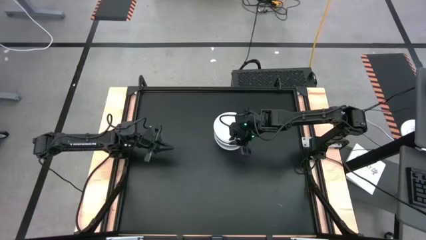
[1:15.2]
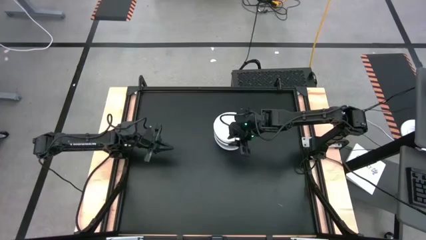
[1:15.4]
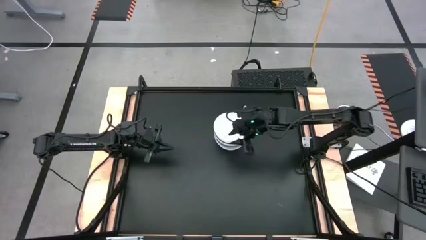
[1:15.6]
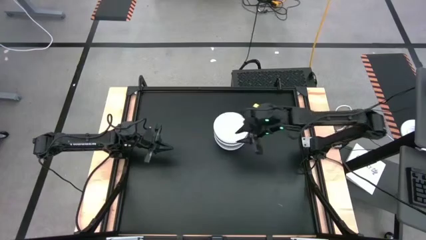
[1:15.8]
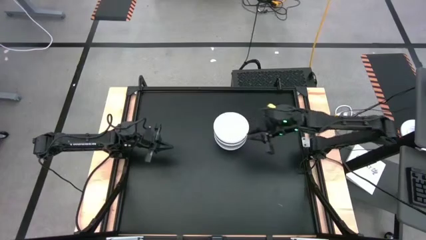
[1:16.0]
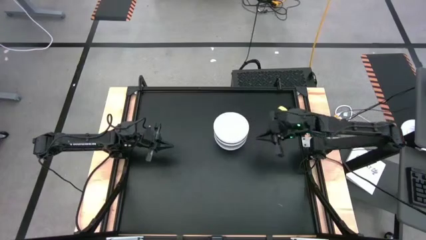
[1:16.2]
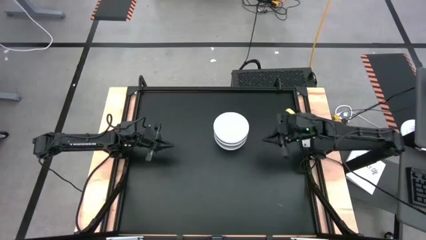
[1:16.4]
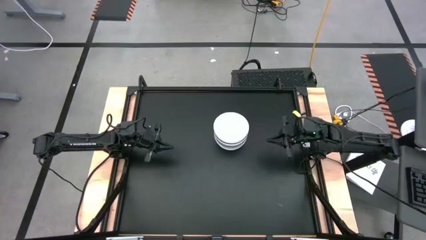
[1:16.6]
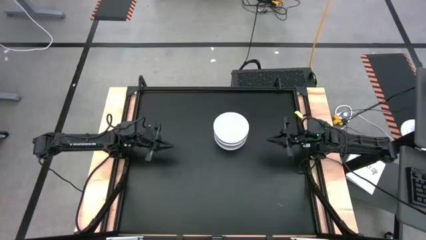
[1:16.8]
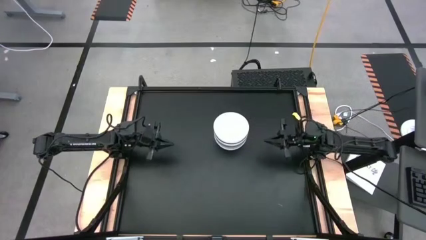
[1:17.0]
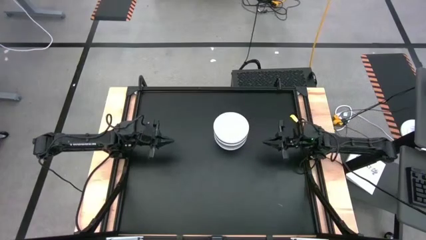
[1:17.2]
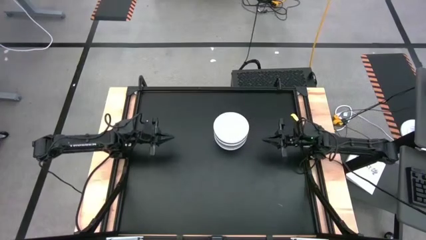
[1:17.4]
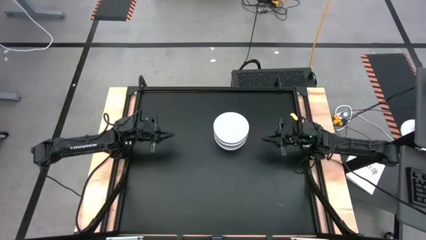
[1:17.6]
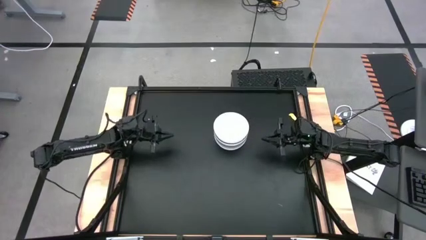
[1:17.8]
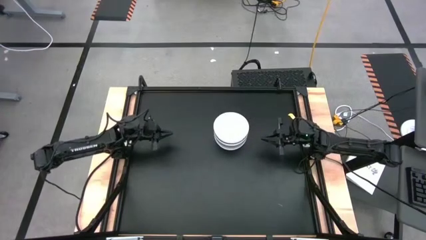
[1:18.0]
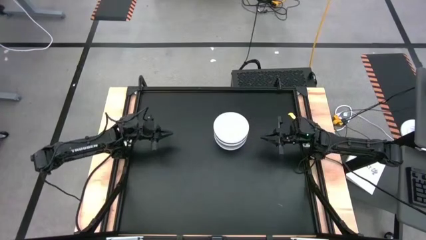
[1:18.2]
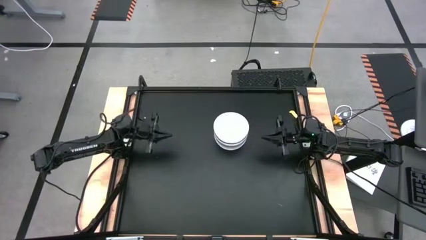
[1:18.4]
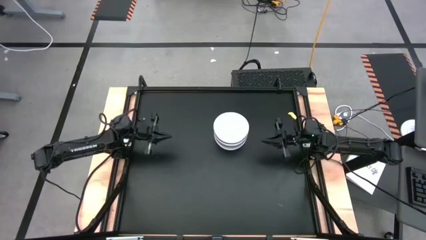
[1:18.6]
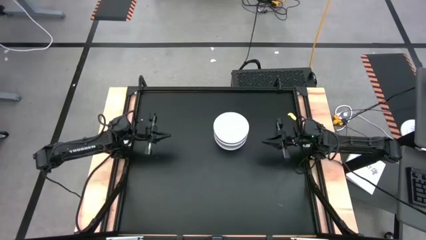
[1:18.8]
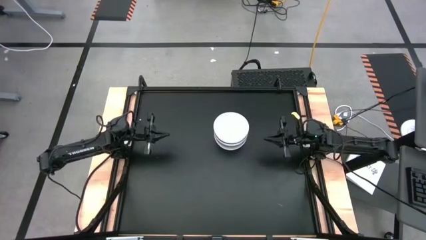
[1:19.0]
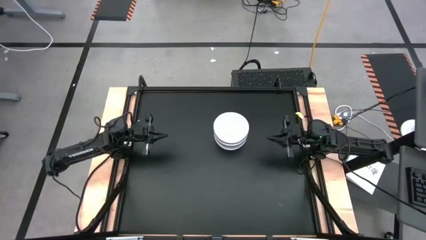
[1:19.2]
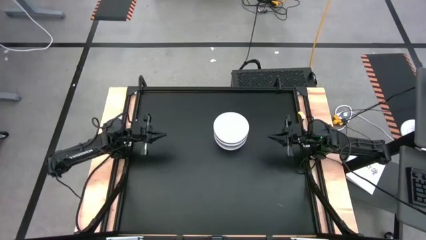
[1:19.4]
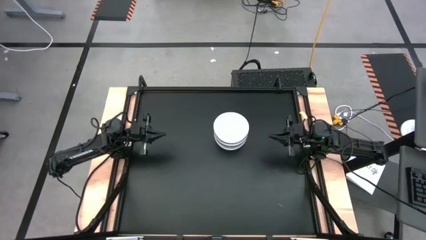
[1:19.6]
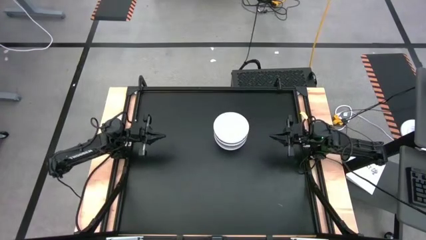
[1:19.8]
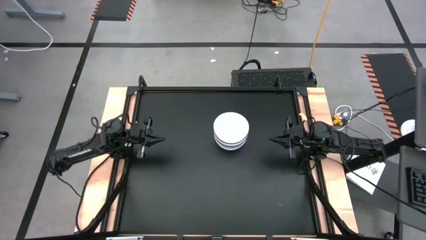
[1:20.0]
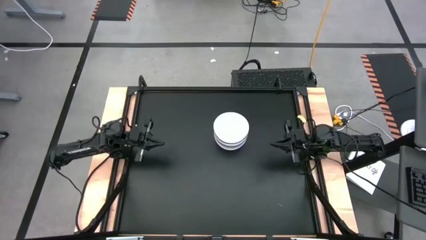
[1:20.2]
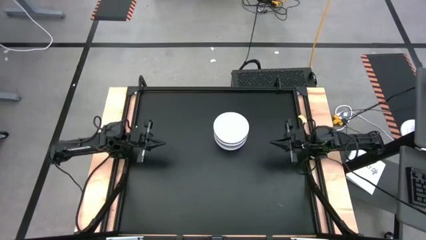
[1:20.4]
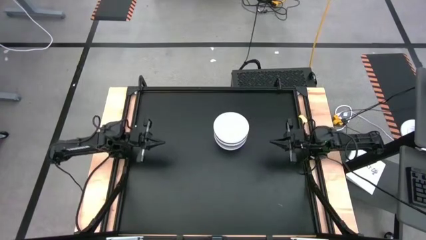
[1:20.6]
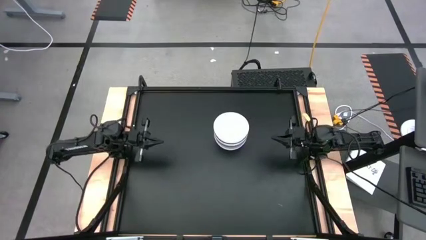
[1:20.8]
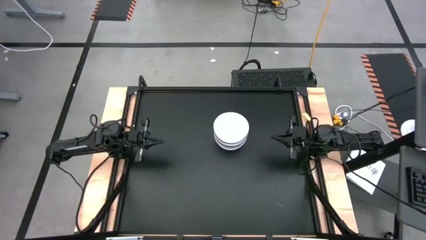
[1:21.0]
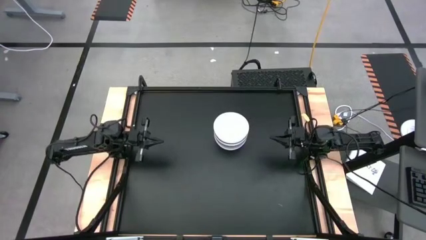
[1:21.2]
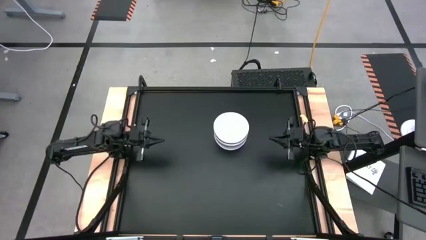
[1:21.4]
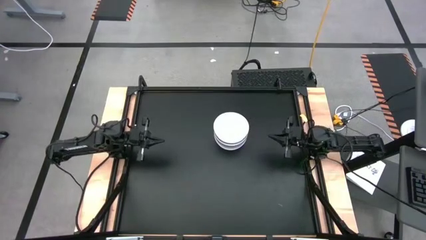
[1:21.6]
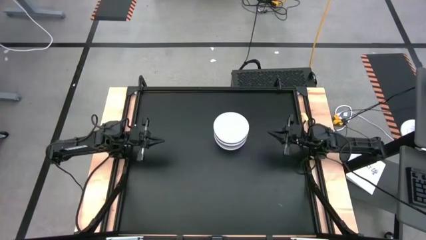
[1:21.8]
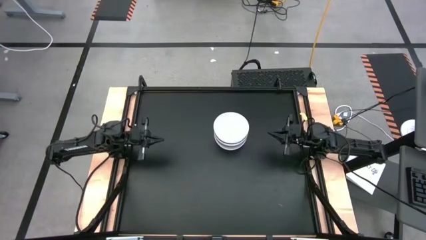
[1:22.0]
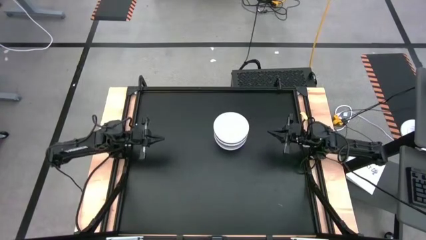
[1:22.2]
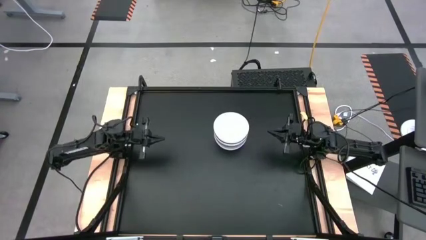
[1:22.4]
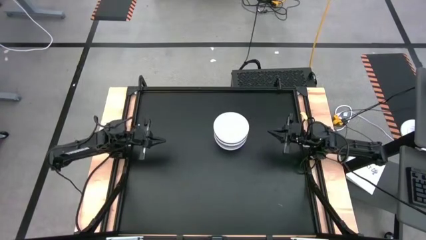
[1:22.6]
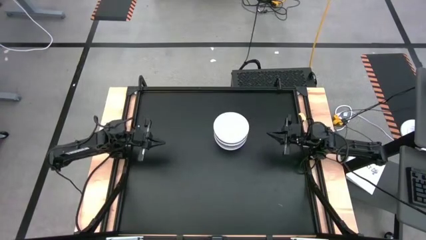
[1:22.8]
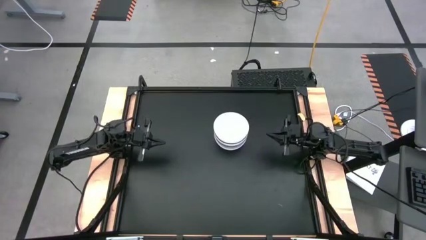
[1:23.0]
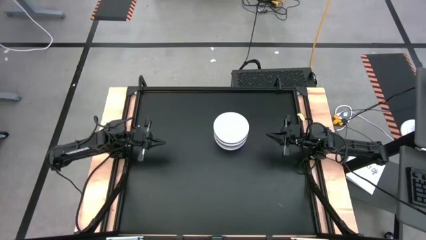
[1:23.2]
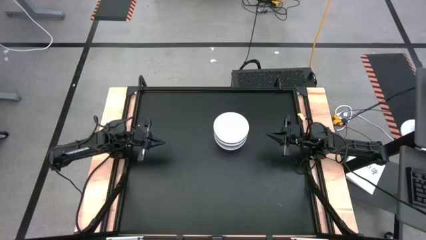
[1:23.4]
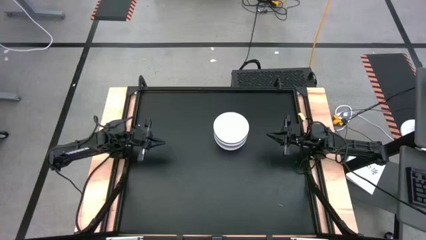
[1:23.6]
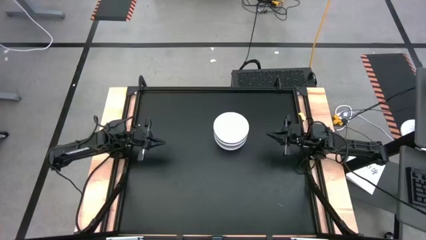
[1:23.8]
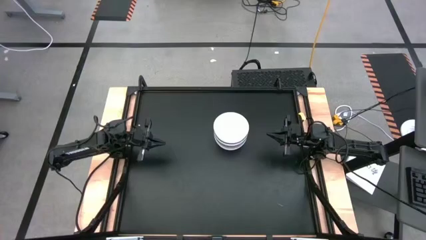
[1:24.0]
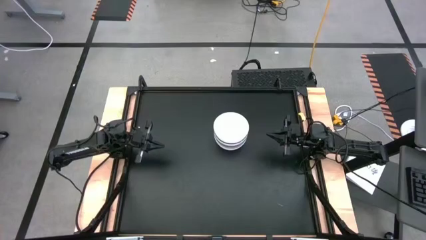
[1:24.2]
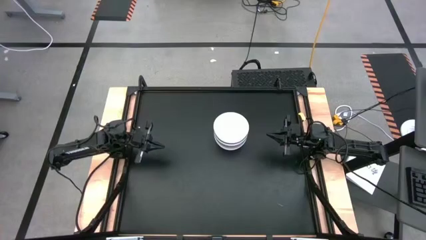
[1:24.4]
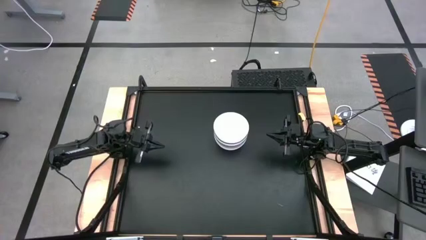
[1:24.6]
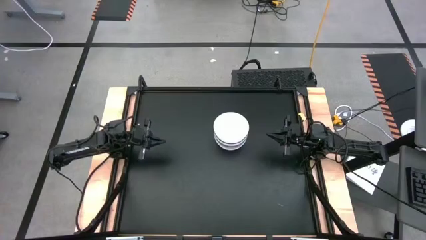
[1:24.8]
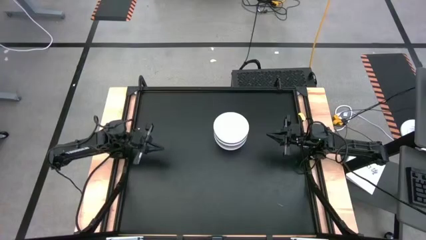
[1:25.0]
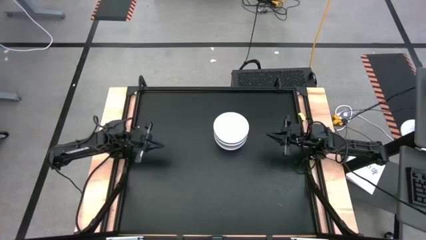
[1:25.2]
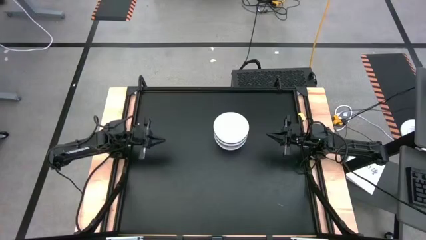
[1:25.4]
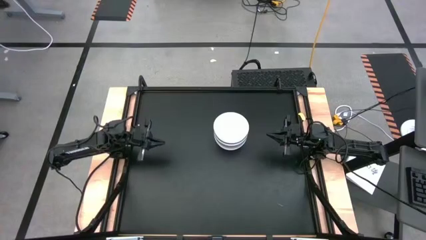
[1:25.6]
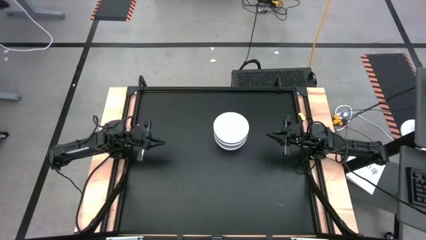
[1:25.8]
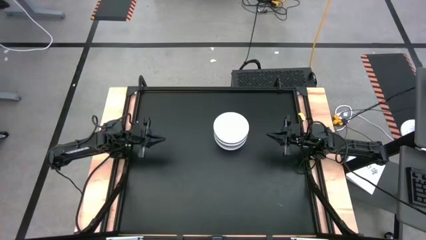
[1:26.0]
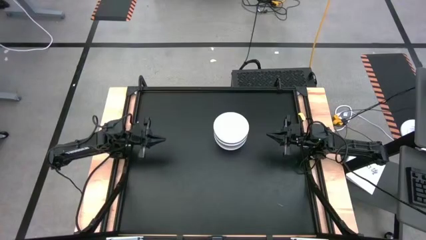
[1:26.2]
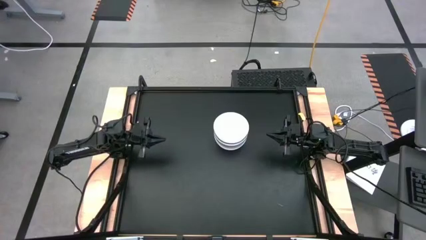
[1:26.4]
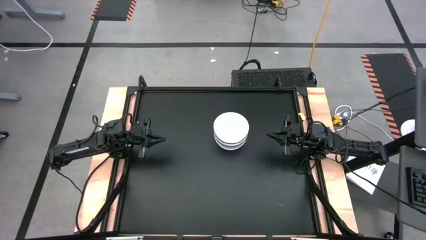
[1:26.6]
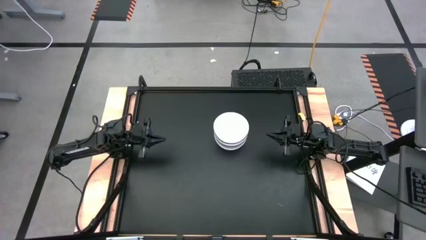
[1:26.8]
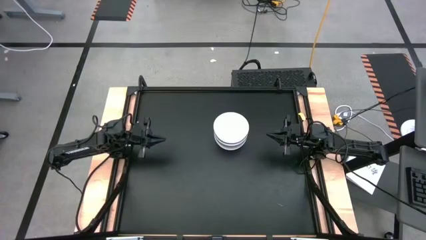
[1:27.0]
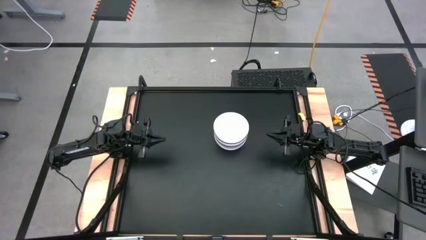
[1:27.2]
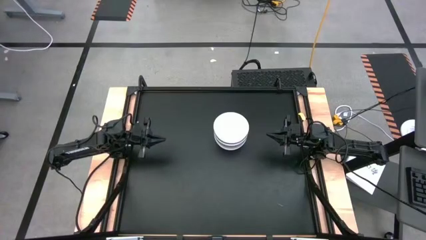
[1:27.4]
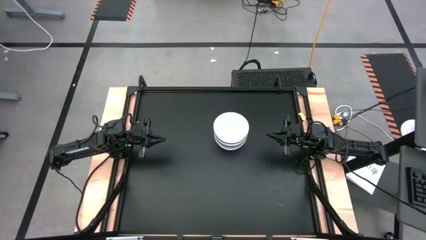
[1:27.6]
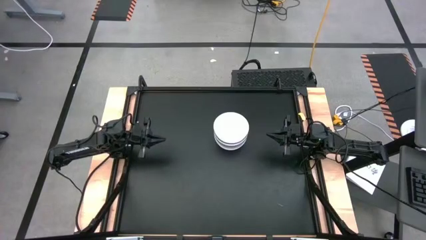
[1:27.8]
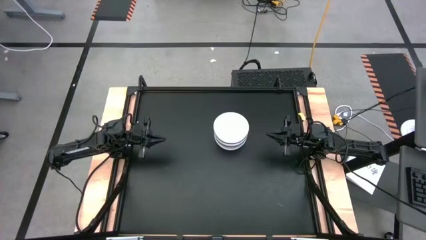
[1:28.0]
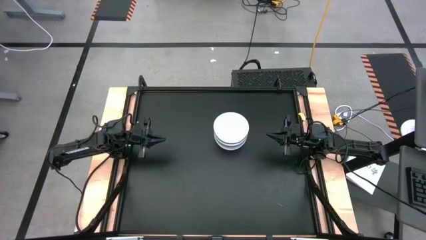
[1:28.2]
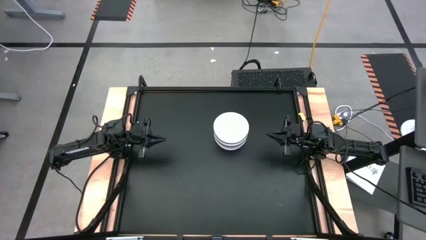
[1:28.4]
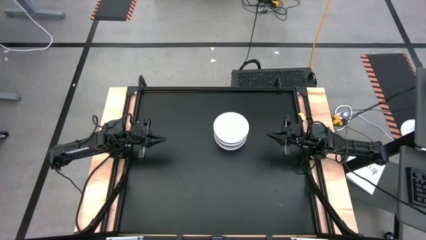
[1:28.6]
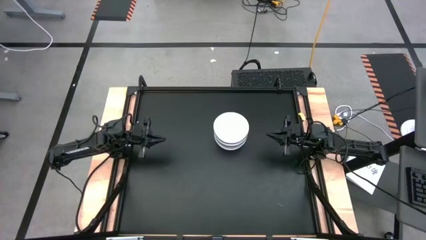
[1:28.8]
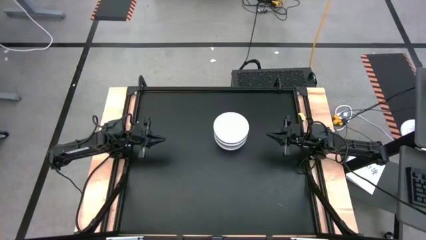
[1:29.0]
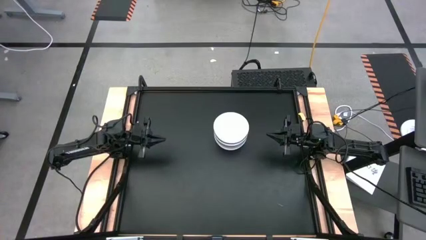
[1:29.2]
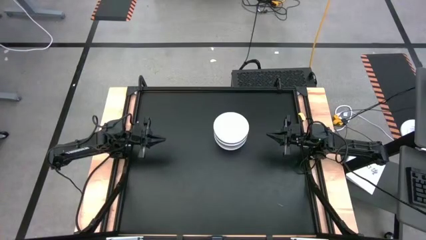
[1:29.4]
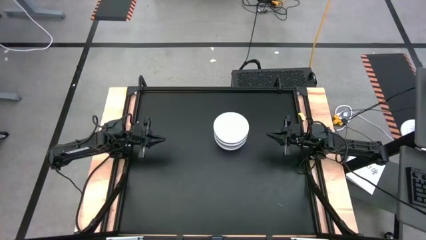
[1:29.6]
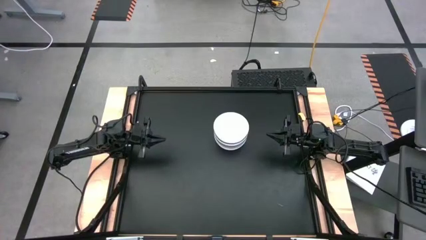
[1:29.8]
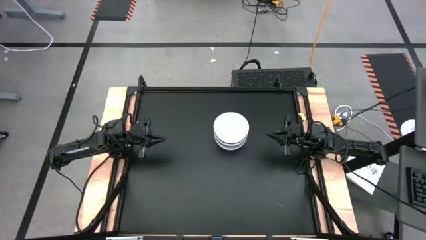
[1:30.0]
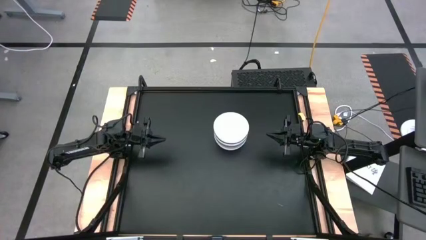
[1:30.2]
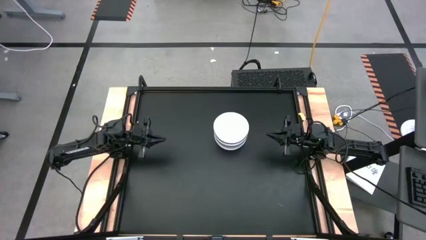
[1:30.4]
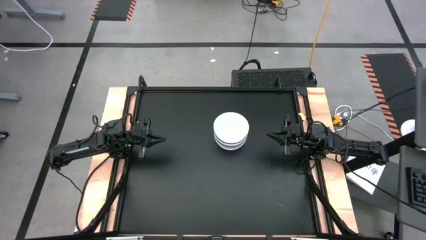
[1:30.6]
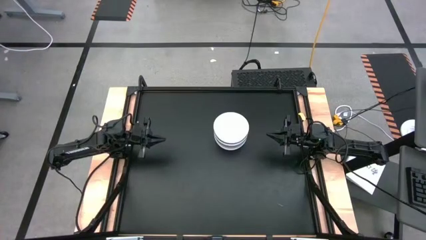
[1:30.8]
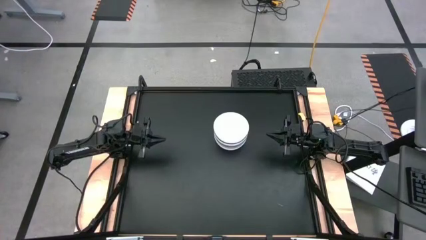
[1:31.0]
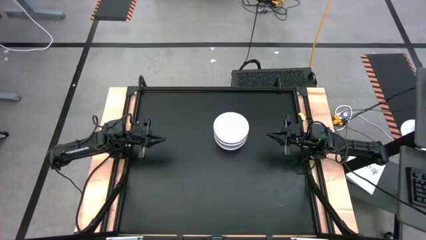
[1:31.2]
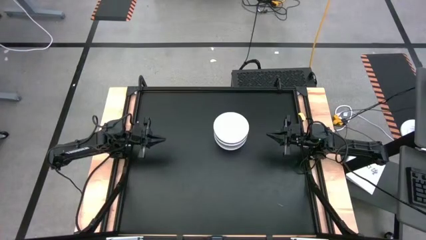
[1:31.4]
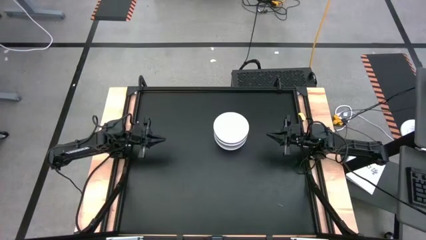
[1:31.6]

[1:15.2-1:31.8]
Task: Nest bowls inside each other
Return to Home Position
